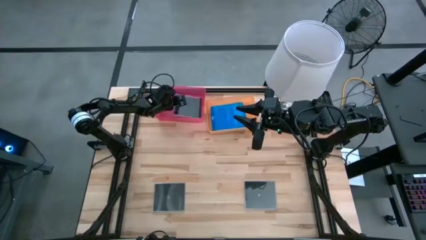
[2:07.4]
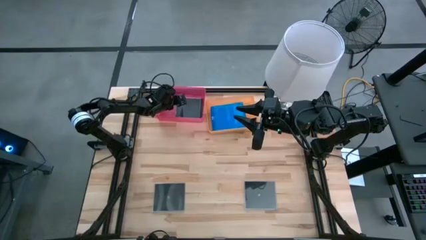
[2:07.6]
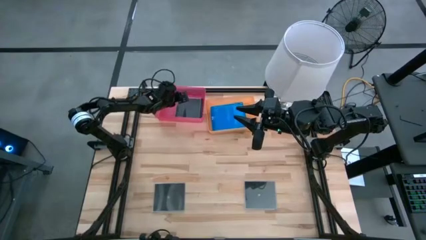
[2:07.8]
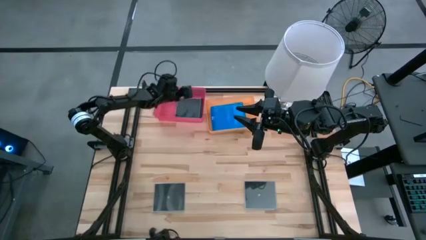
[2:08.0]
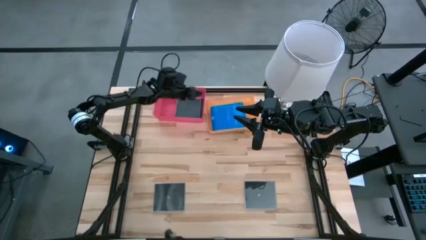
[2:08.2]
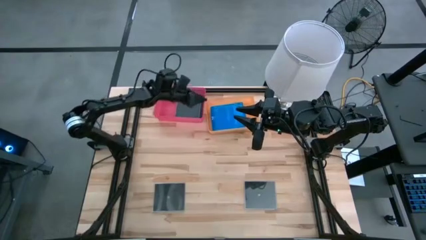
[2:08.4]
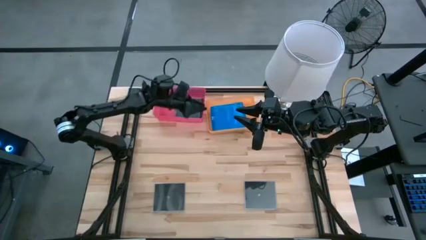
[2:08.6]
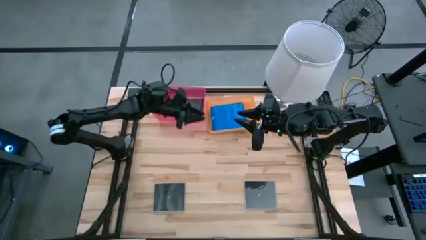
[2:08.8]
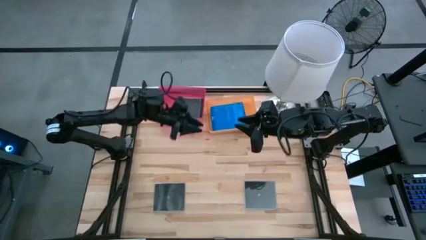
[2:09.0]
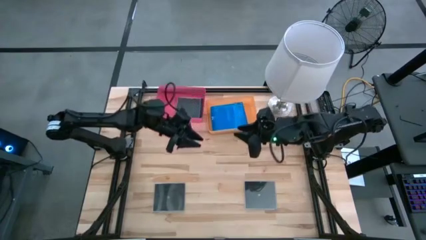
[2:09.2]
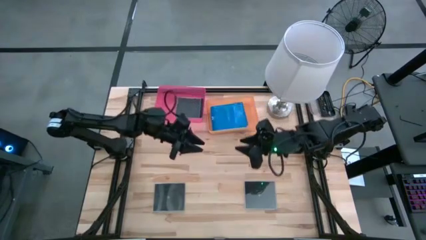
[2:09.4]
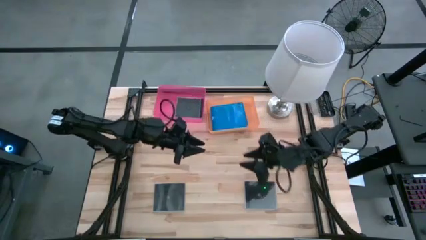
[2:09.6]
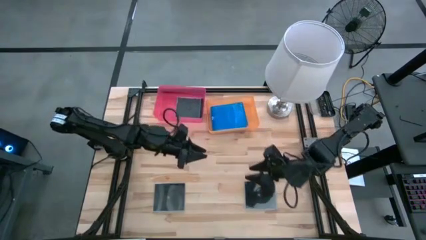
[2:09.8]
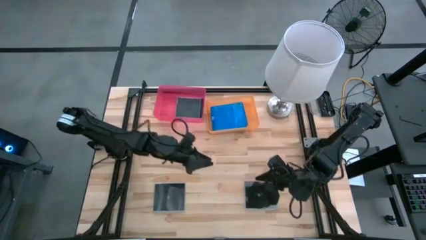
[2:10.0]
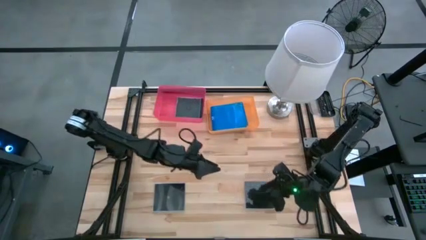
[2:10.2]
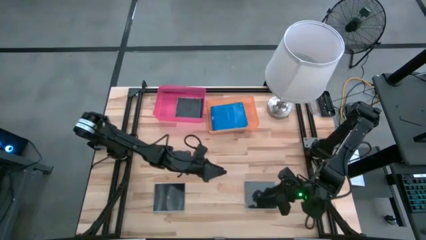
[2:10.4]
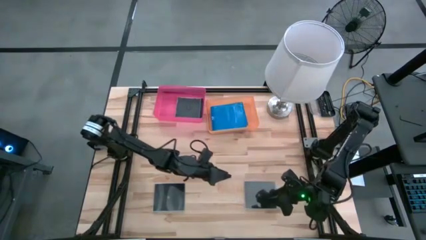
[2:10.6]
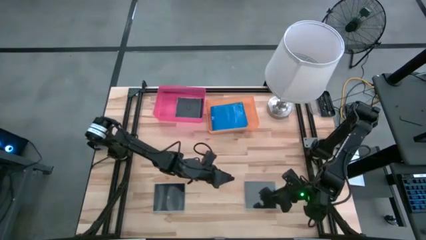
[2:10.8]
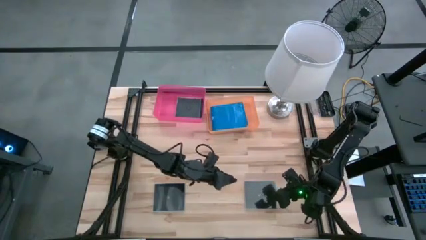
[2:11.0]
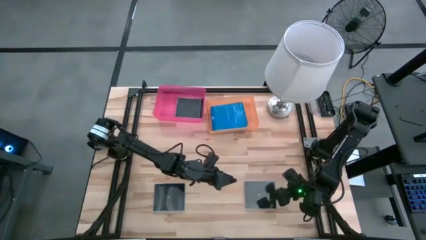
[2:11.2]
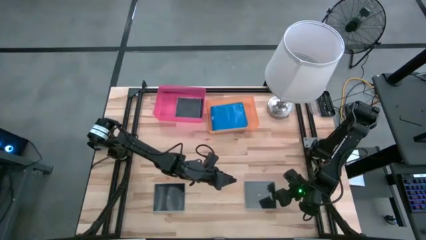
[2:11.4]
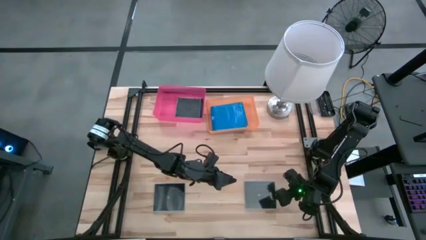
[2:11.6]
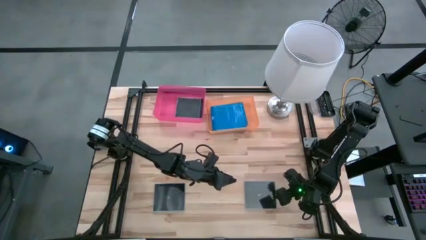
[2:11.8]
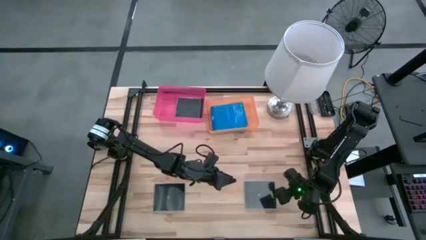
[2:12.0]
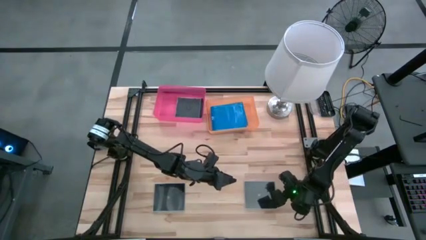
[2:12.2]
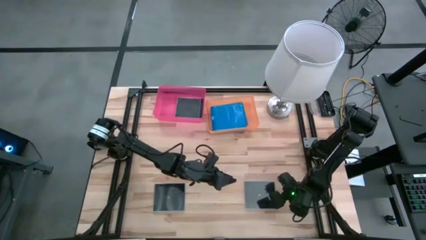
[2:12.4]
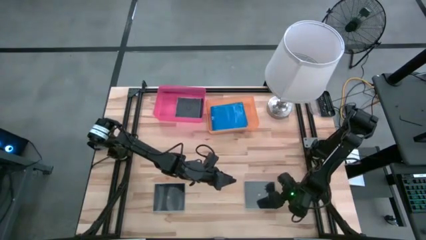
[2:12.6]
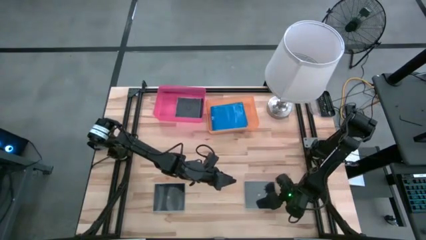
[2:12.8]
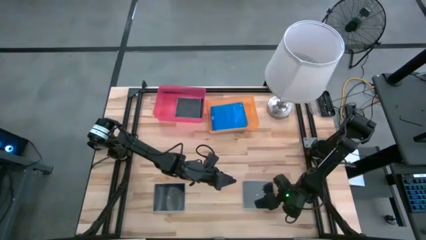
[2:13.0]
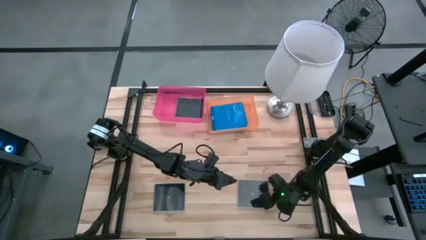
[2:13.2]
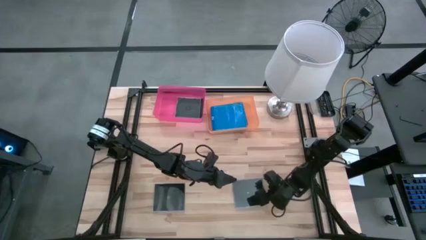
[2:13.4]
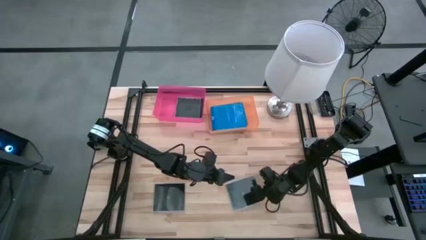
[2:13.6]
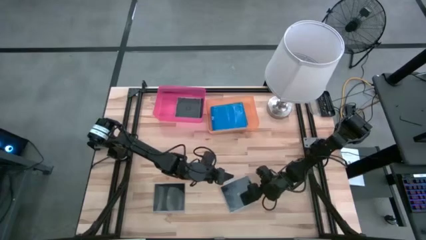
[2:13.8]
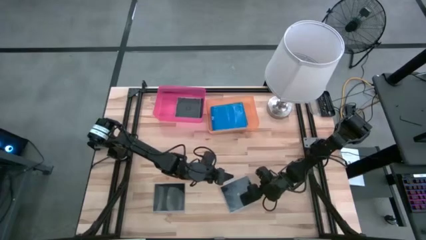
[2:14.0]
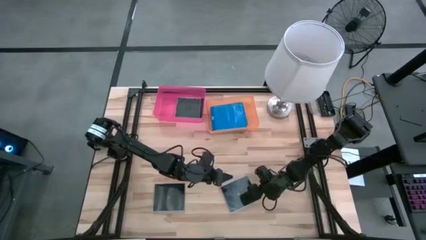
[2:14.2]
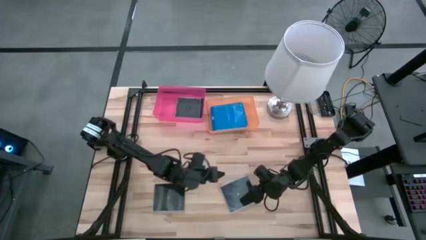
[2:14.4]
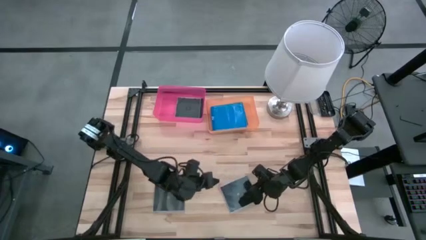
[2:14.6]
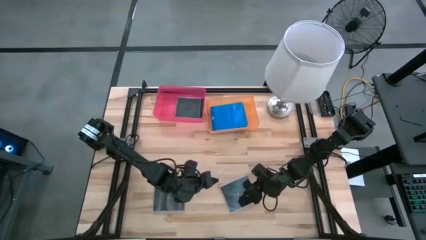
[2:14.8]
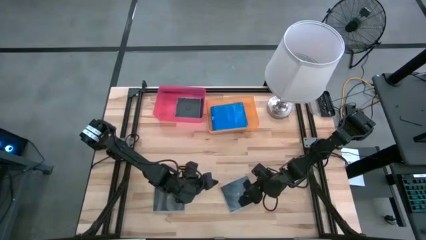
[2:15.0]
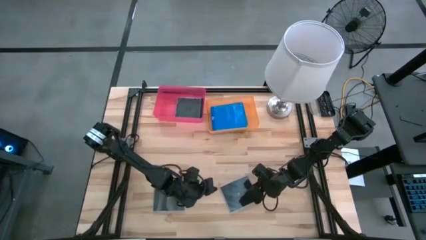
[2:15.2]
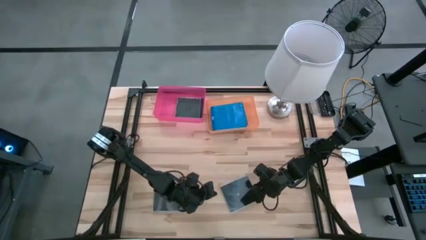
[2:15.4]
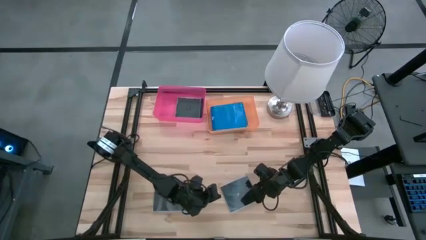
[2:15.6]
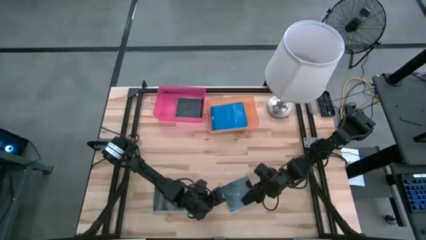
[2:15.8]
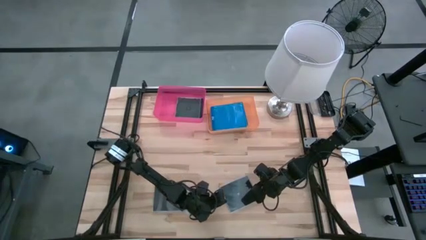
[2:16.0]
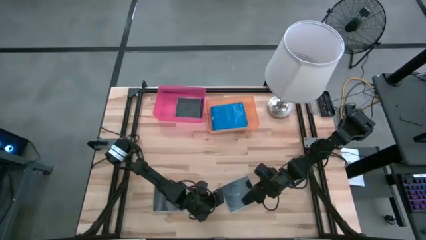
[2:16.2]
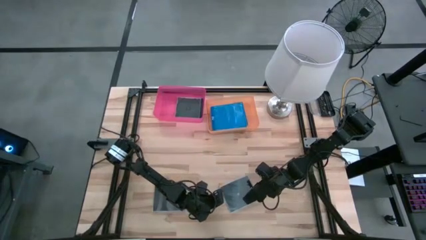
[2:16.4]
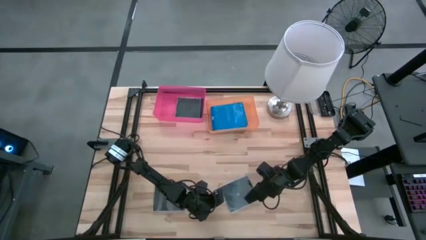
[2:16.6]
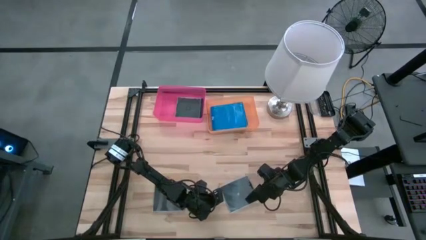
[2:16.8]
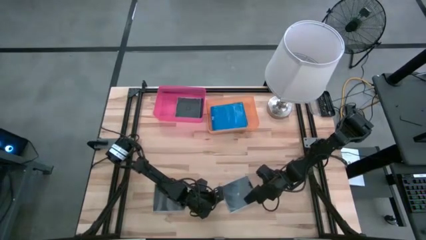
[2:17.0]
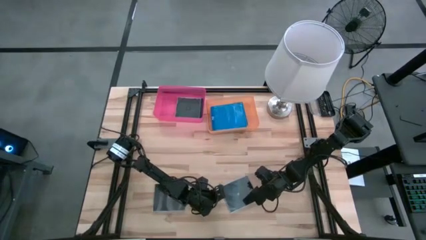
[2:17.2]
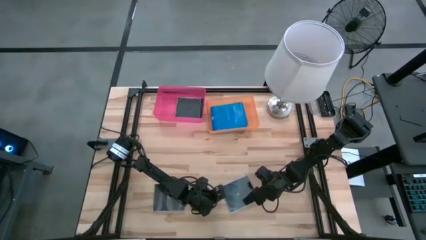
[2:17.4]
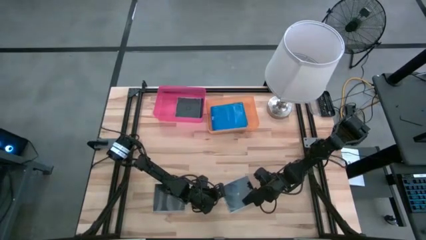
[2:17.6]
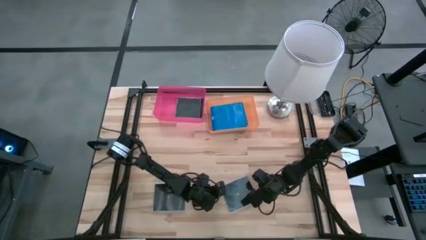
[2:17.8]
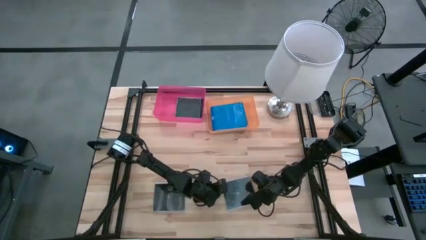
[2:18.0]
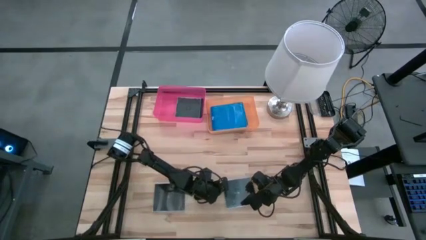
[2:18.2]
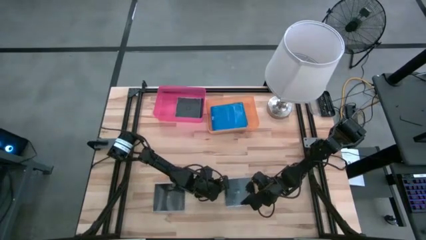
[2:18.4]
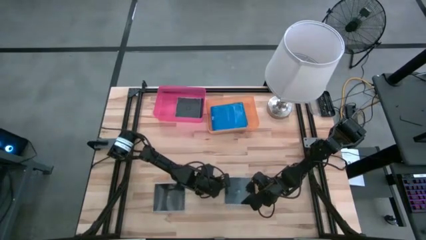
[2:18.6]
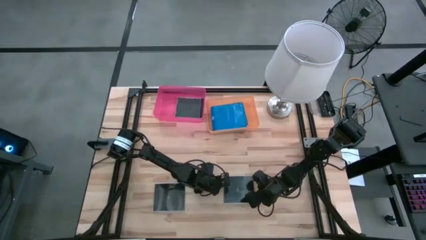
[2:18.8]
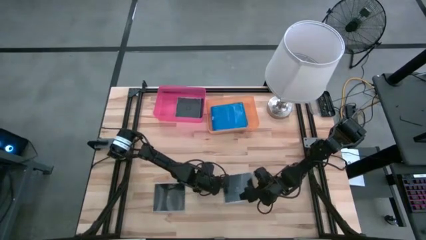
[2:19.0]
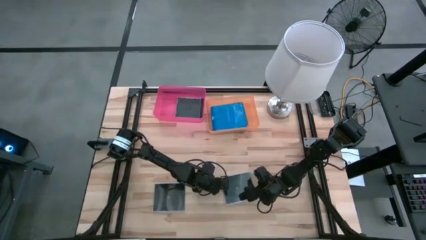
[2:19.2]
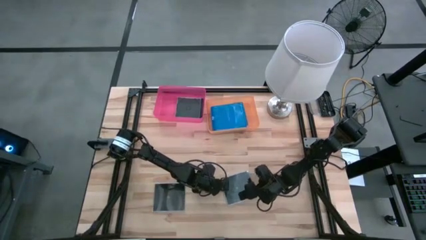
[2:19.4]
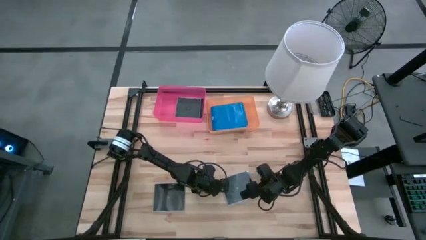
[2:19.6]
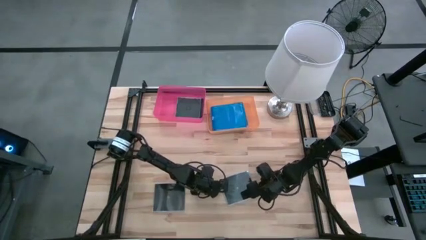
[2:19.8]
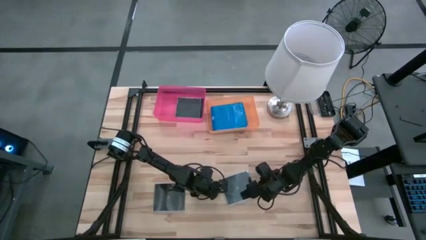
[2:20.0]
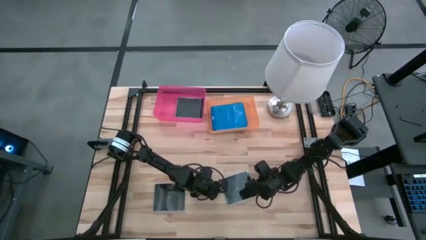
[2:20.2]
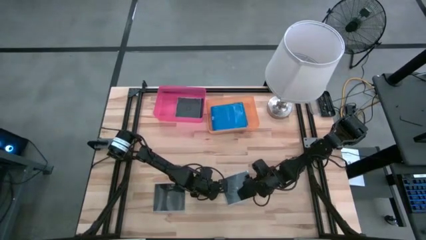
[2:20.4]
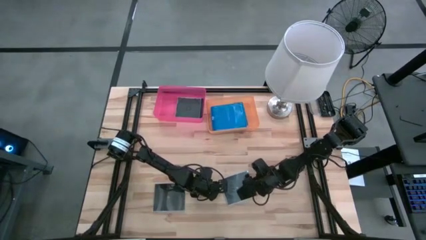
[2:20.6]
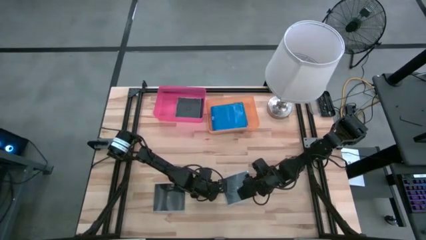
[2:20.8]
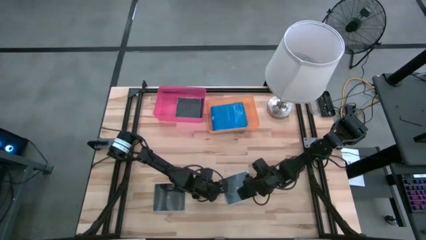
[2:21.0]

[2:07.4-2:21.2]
Task: Pick & place jewel cases by type
Put the right black CD case into the pink bin
